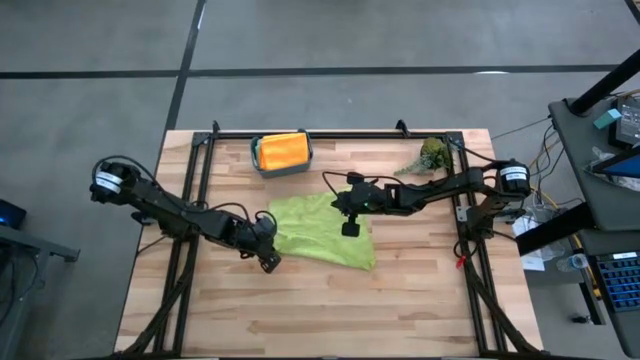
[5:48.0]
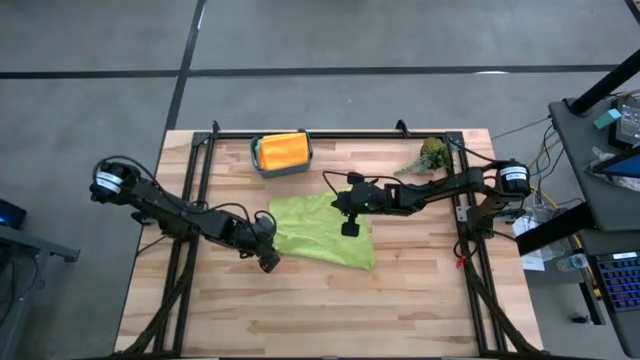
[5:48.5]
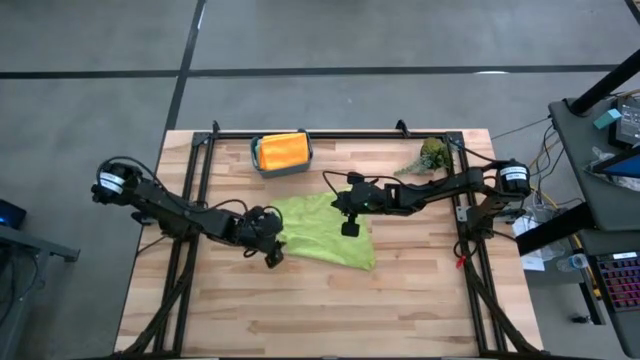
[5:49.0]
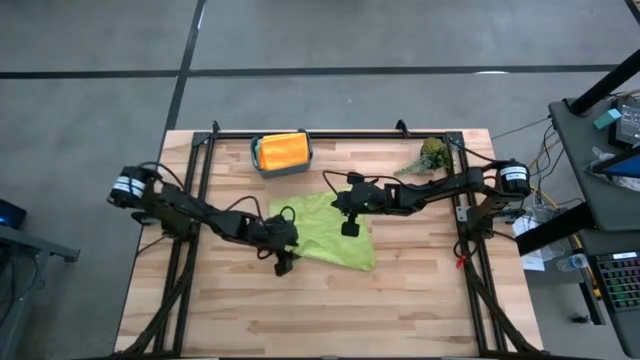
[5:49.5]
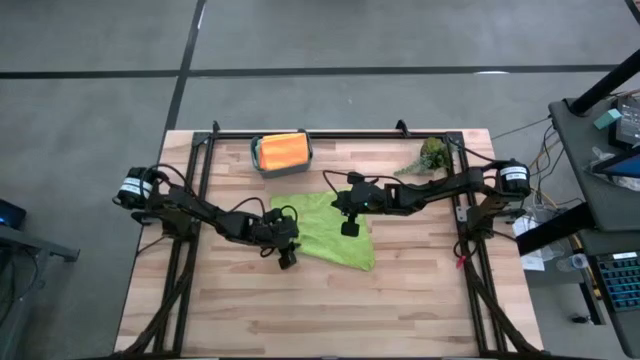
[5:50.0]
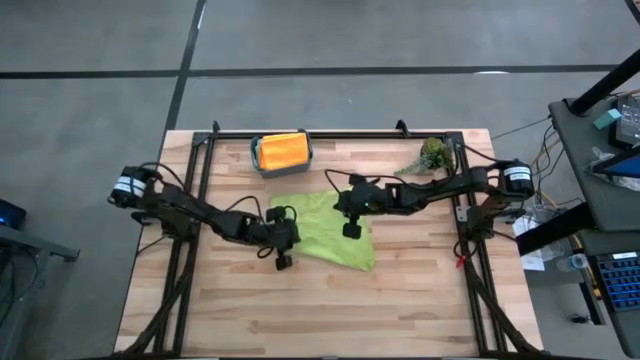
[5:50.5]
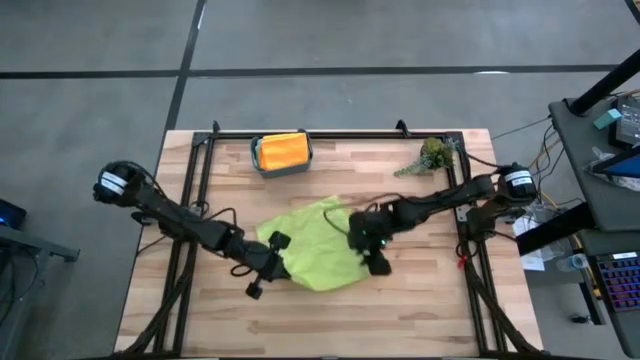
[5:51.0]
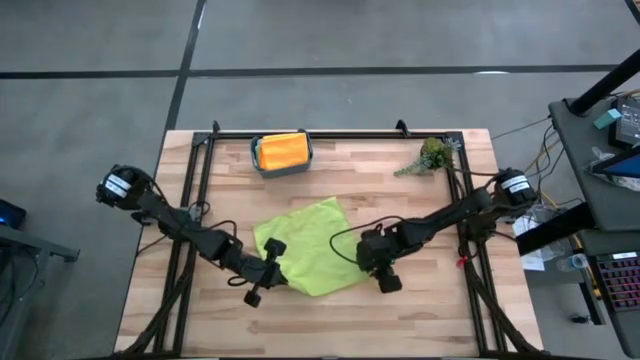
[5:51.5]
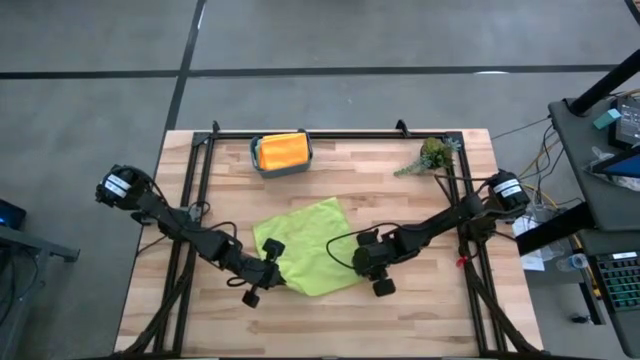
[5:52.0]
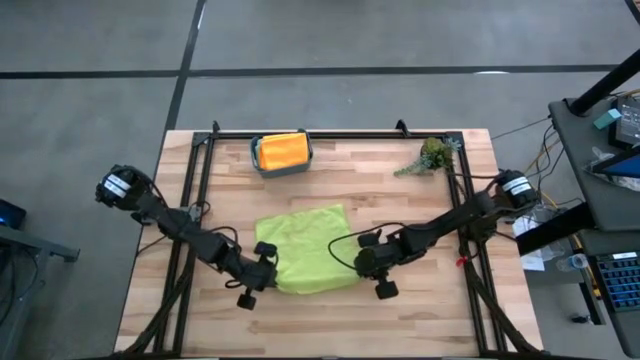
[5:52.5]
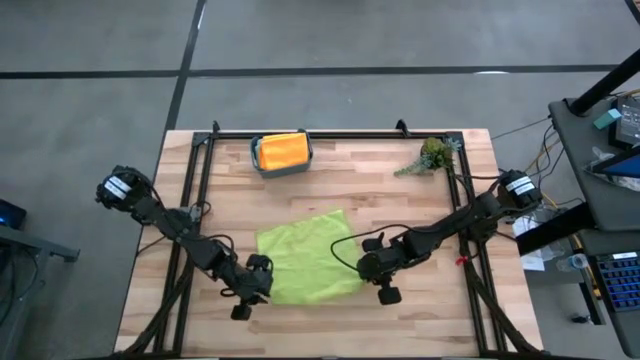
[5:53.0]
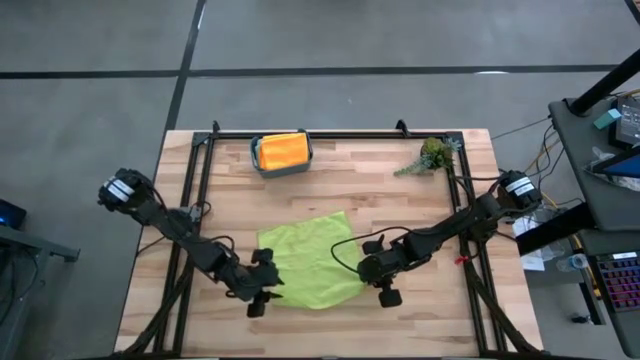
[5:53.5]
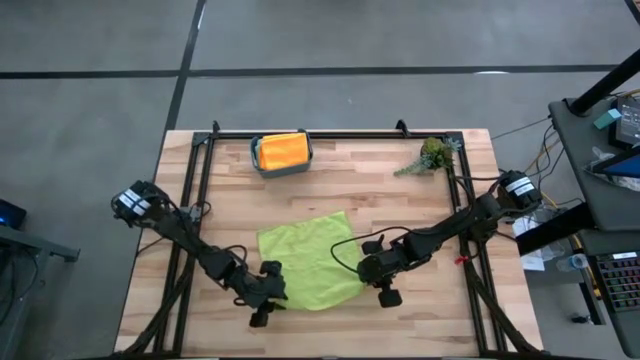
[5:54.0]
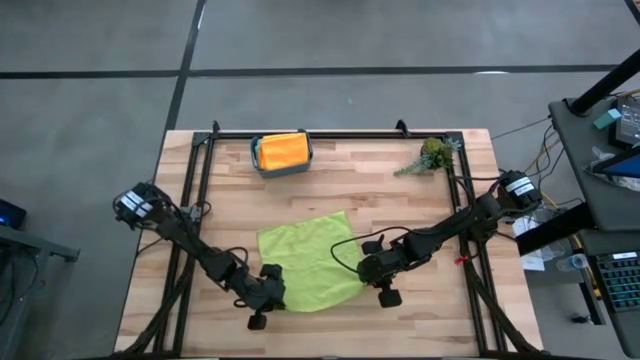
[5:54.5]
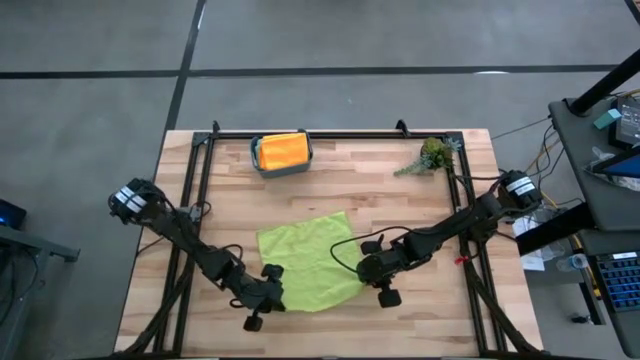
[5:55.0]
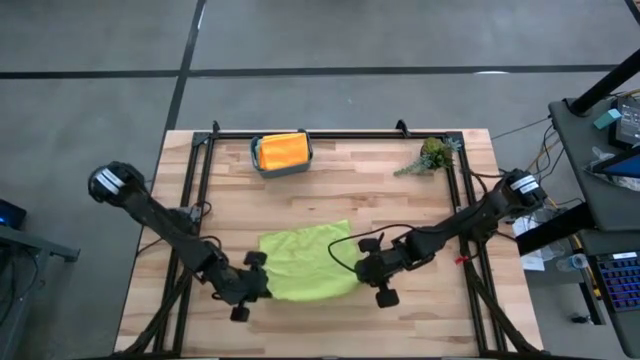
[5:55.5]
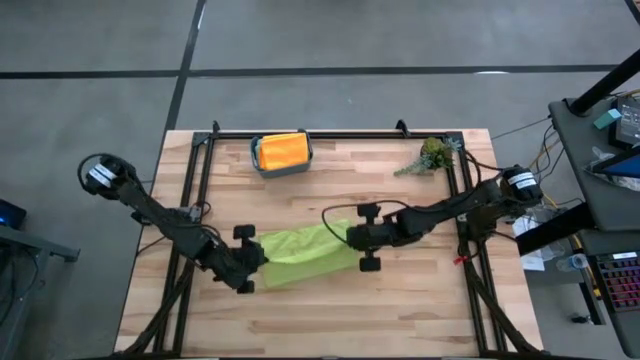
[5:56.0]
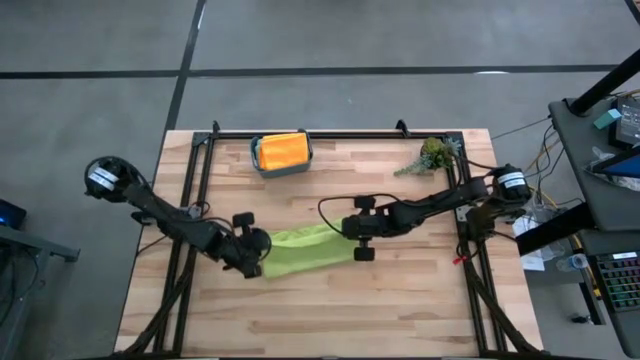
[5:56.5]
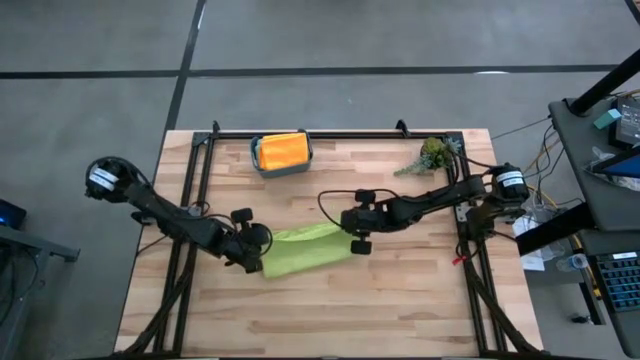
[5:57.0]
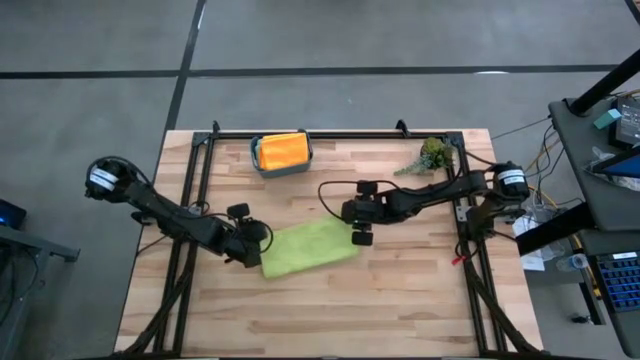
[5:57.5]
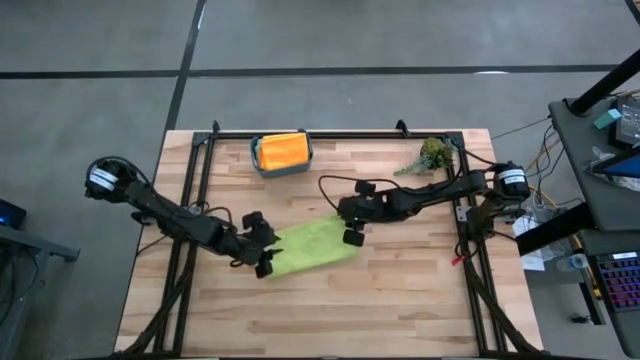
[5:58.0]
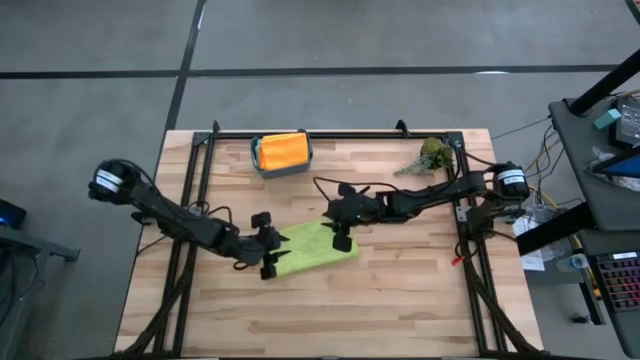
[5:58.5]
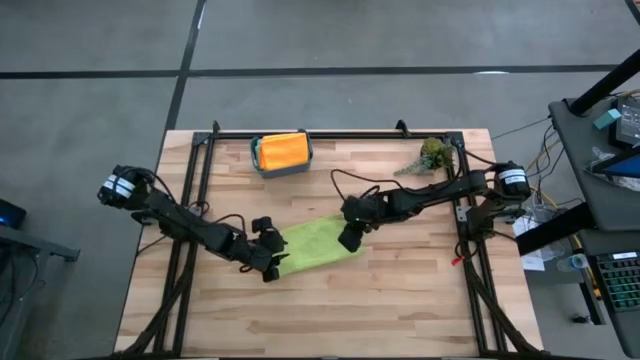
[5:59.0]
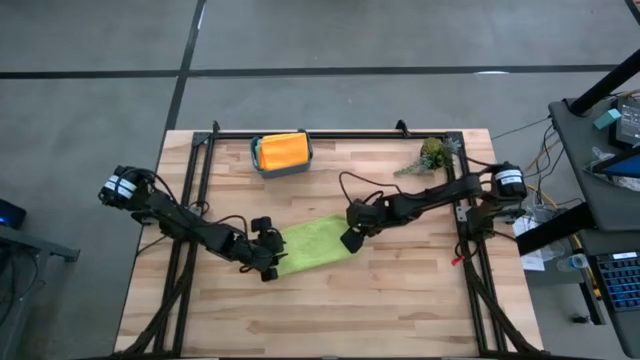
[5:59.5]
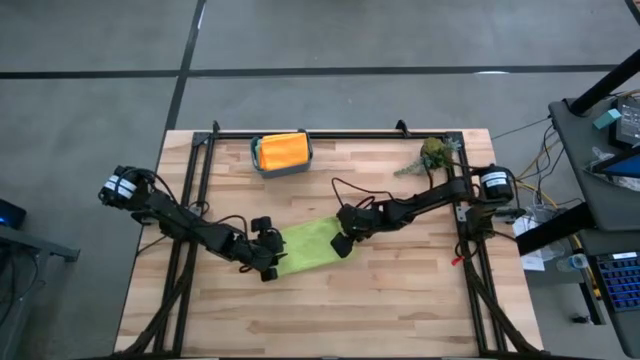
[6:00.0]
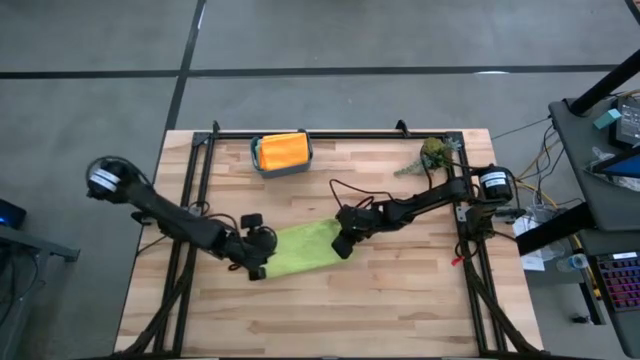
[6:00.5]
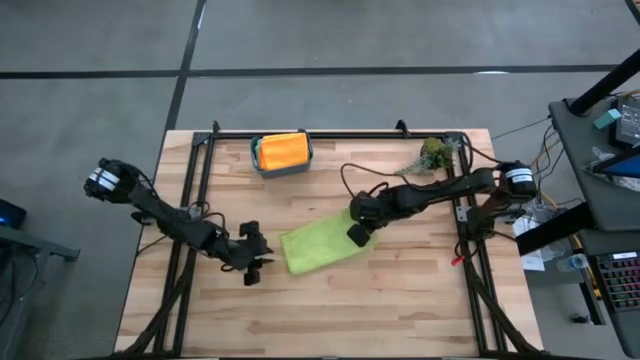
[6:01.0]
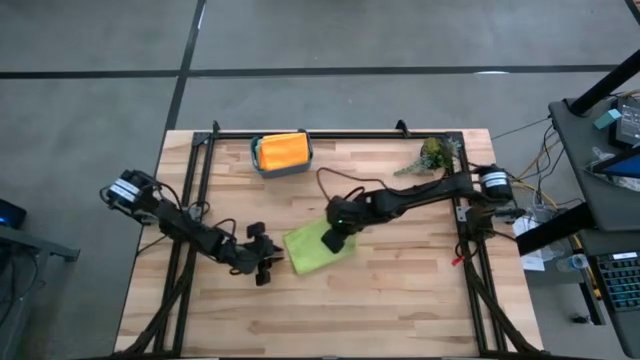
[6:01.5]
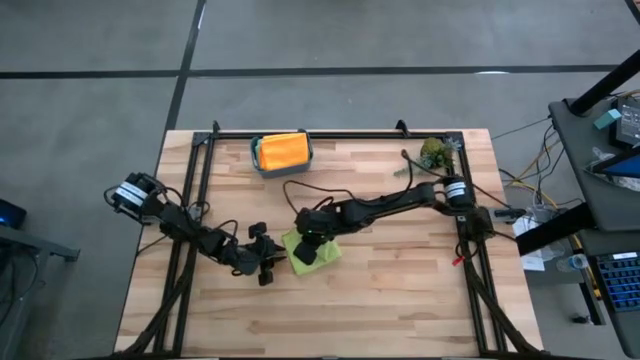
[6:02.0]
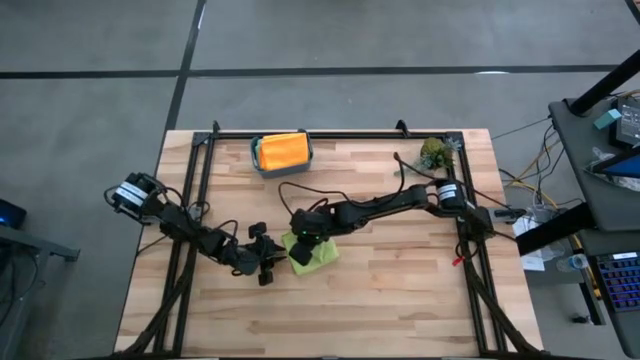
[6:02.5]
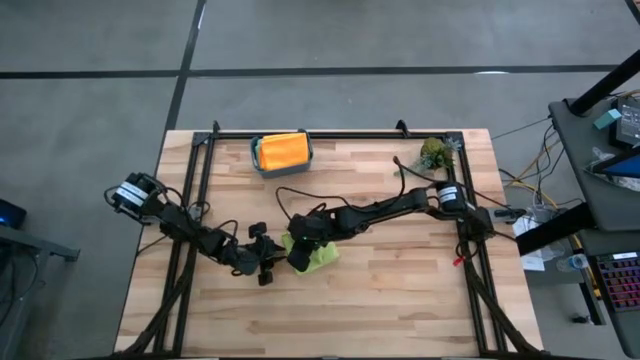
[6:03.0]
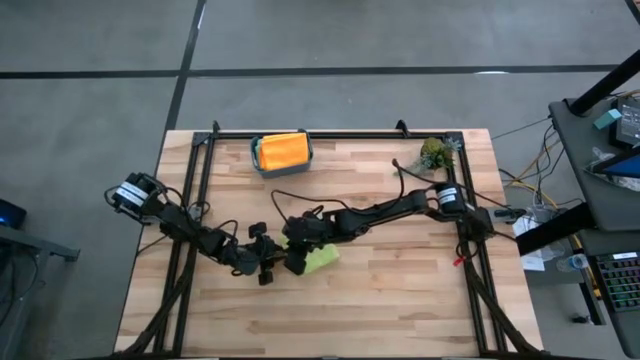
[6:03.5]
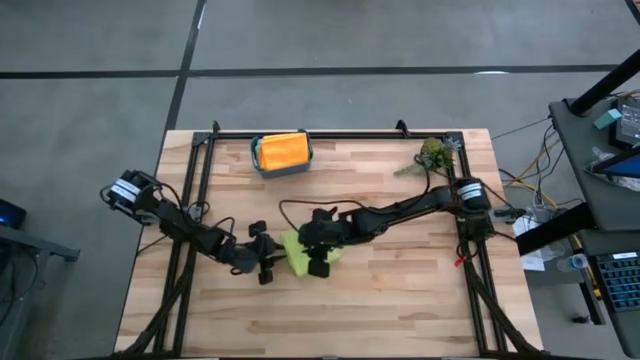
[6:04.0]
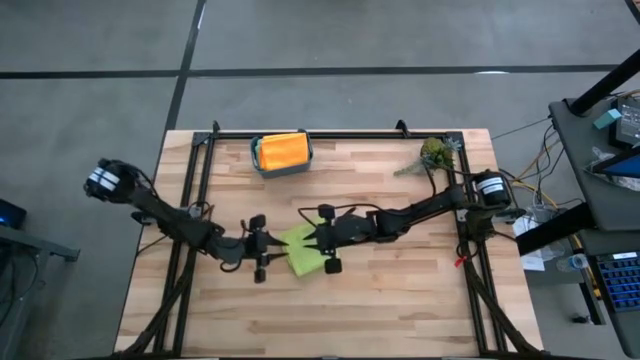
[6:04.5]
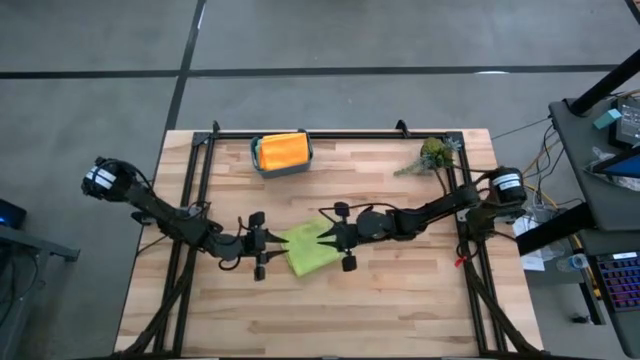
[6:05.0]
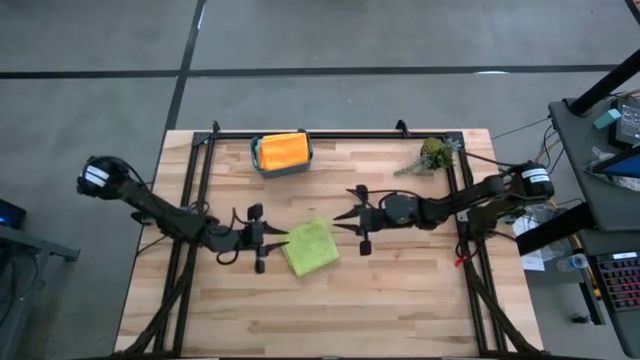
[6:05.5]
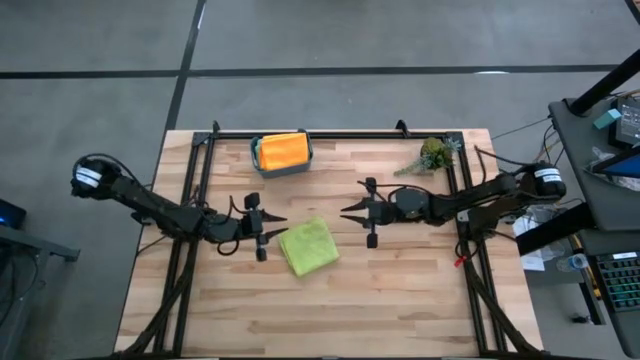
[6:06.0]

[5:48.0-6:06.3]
Task: Fold microfiber towels
Fold the light green microfiber towel

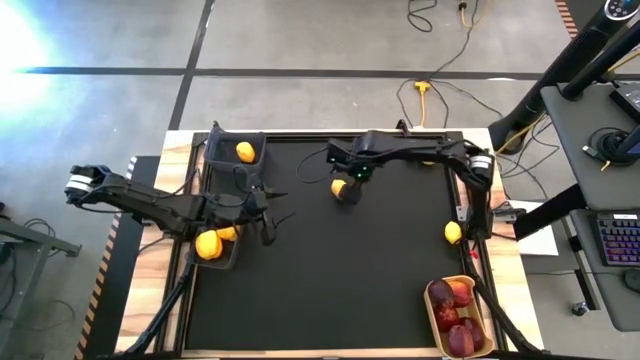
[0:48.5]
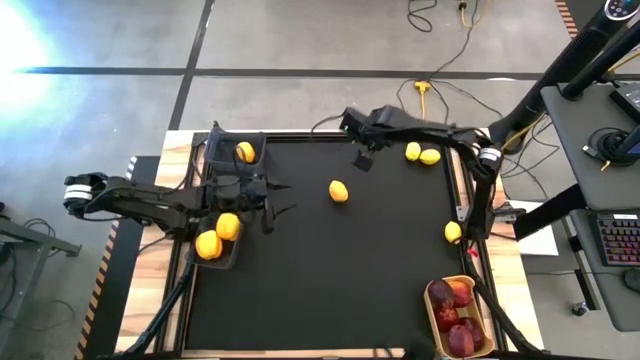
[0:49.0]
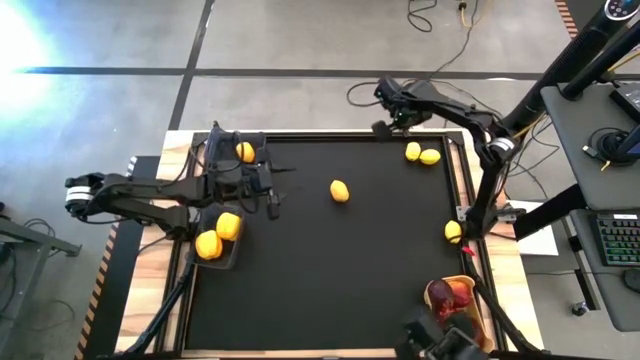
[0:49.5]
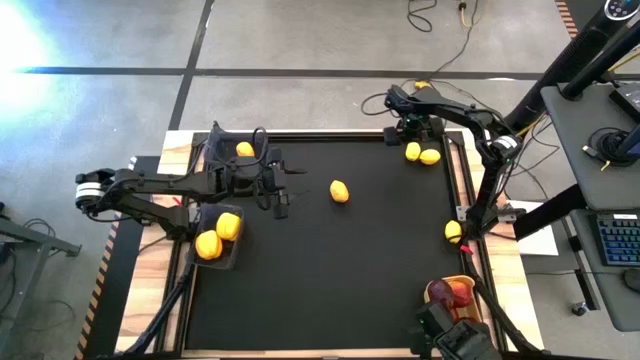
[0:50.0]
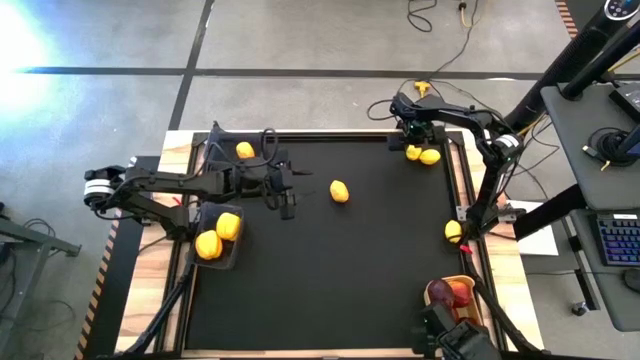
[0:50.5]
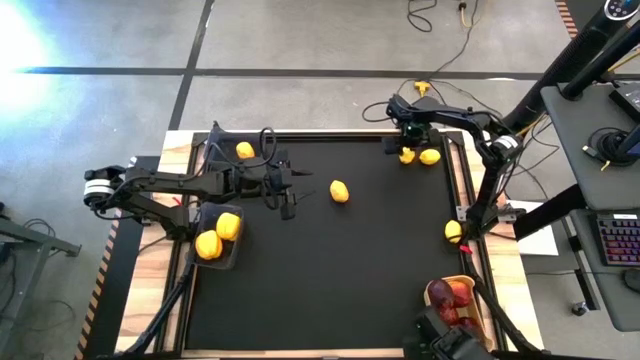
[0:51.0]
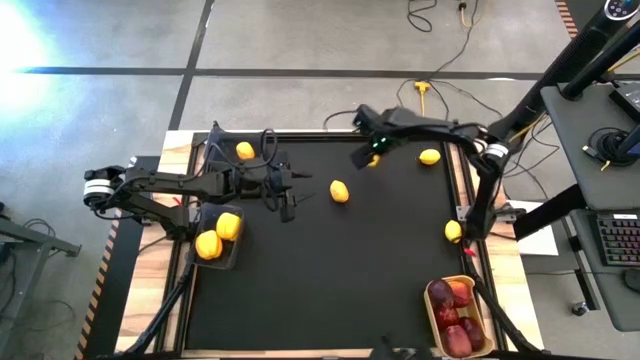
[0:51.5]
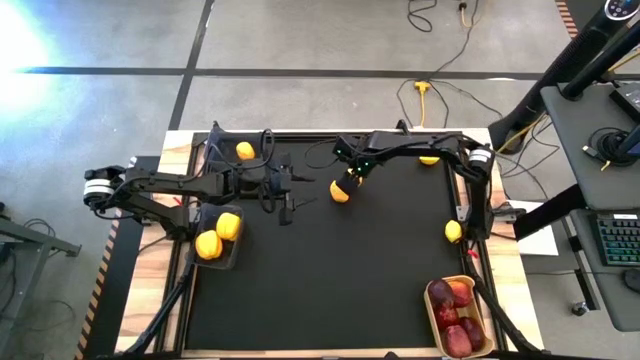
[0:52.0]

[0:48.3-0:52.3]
Task: Sort produce into baskets
Move the lemon to the top center of the table
